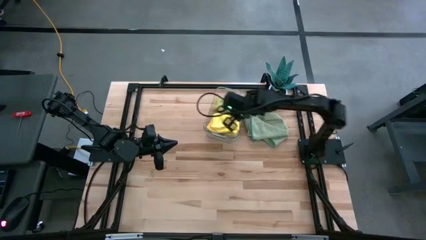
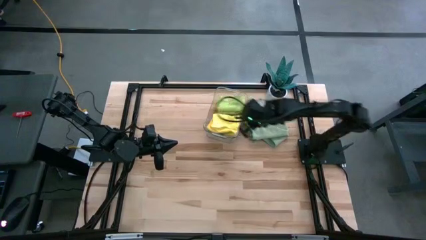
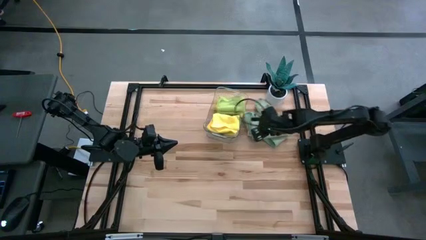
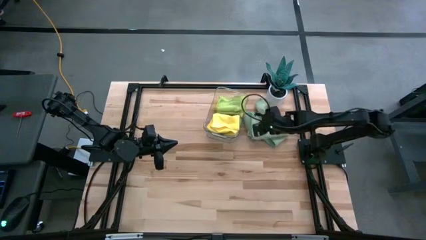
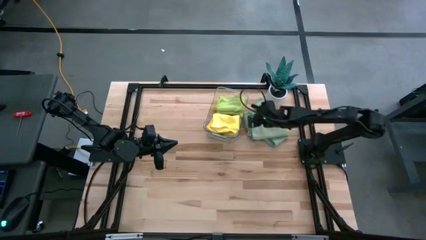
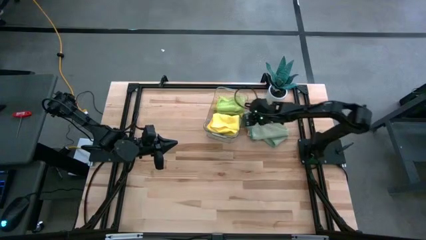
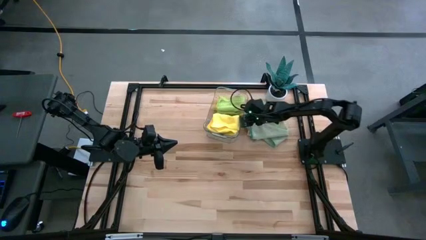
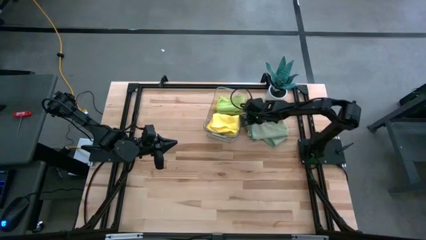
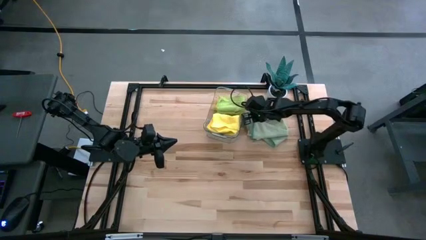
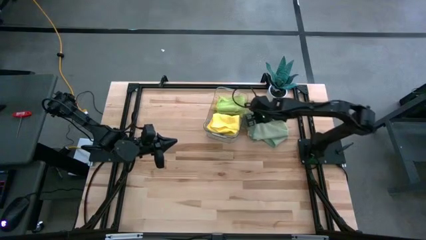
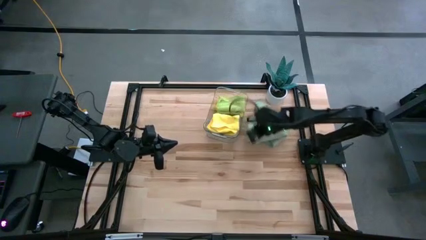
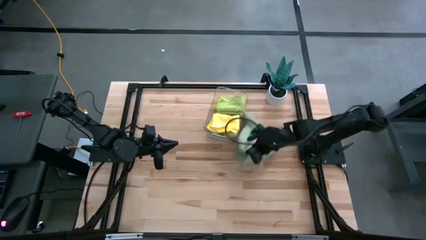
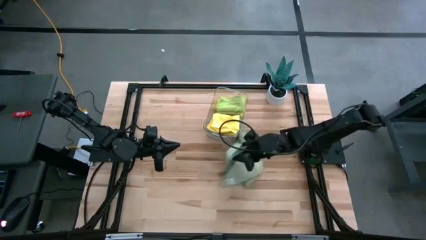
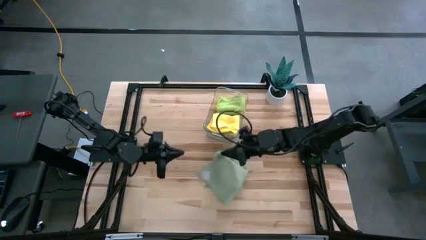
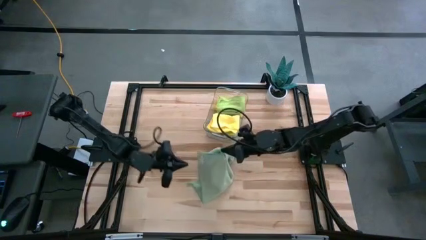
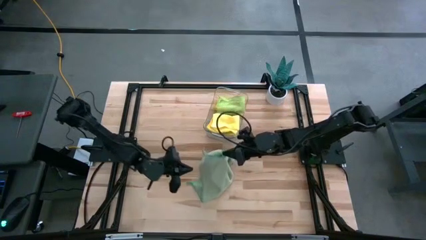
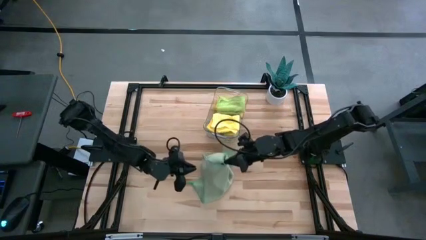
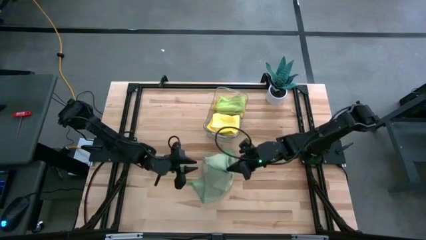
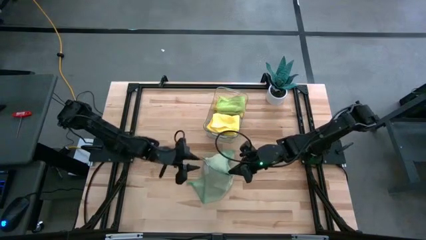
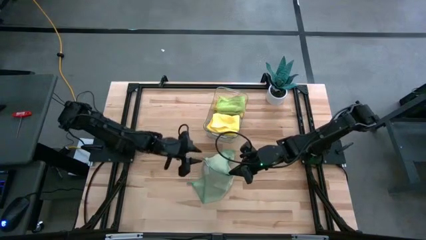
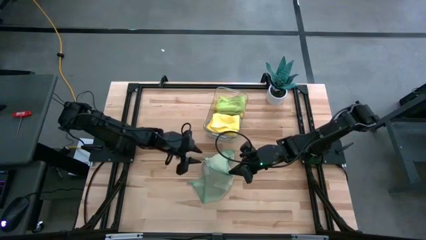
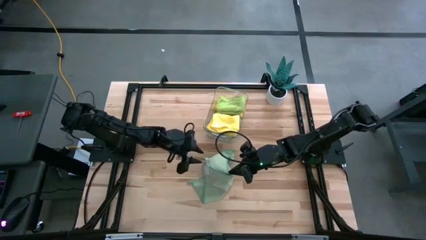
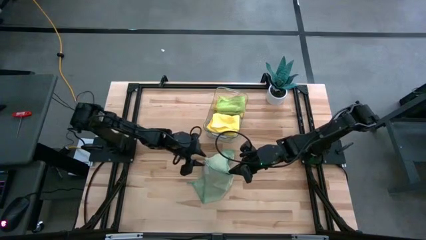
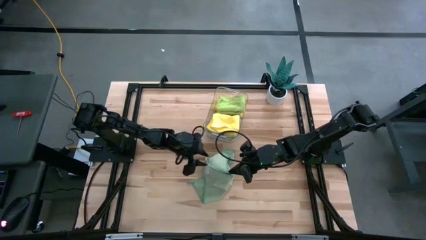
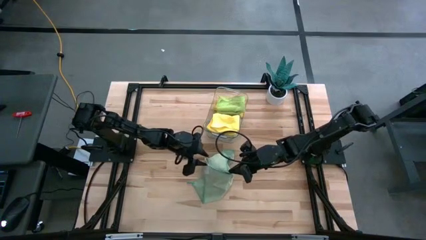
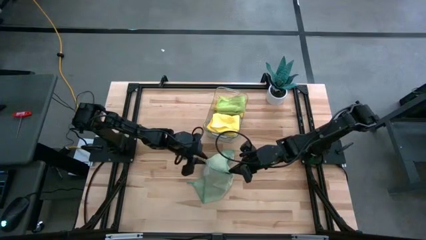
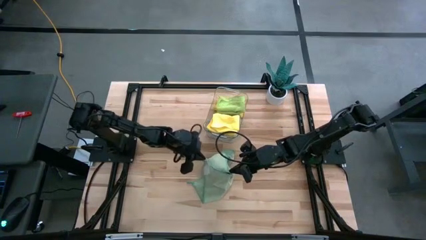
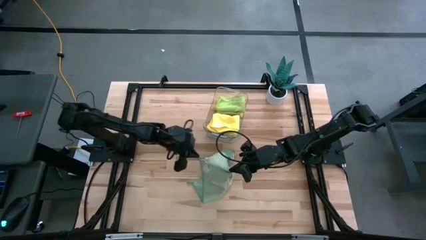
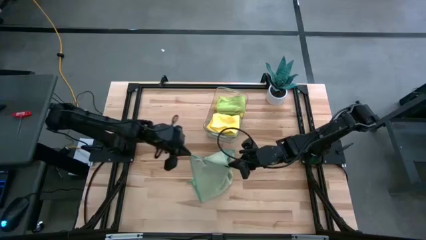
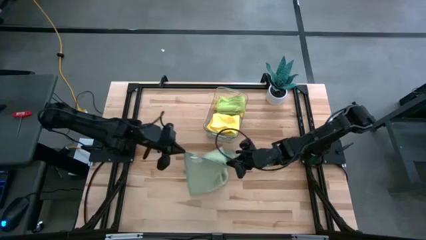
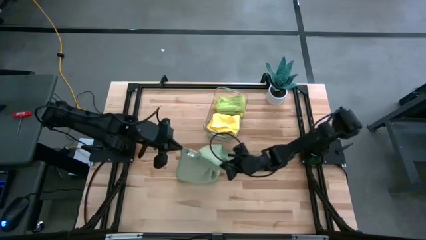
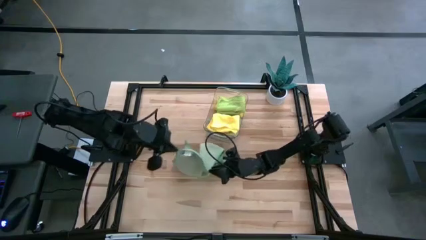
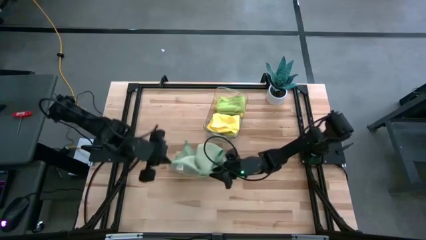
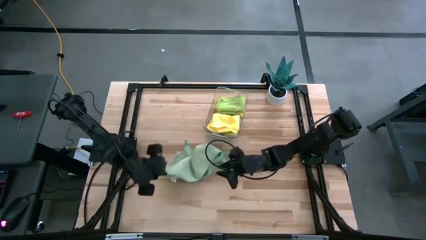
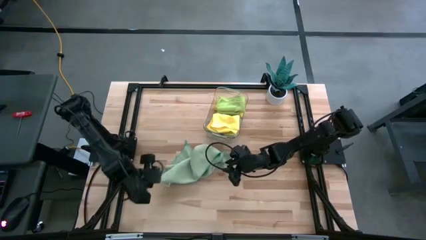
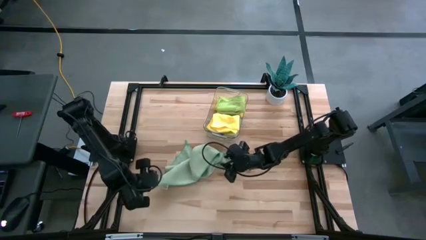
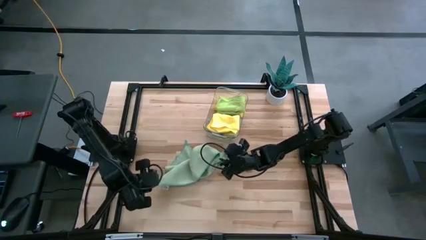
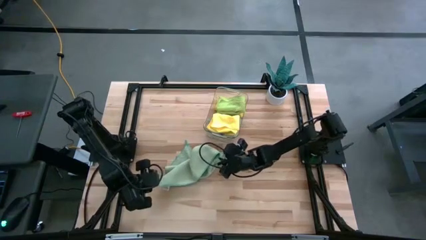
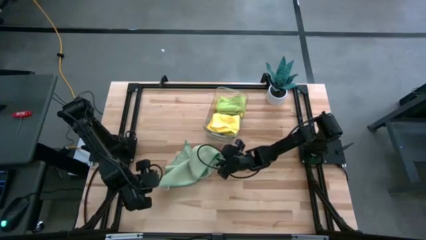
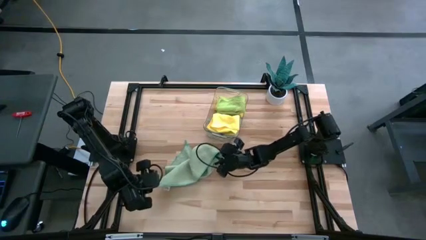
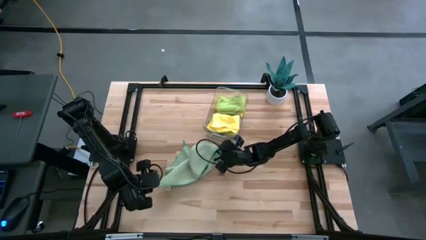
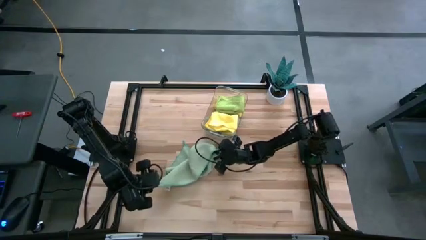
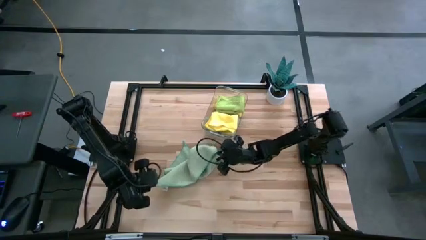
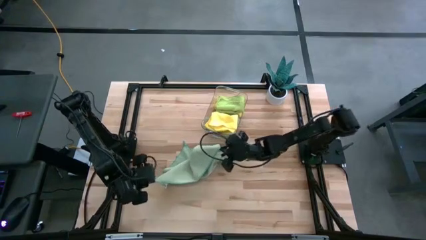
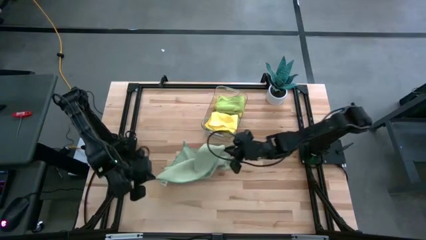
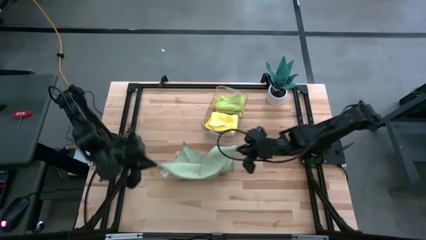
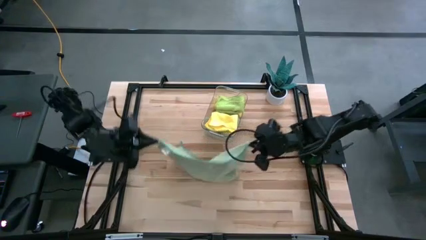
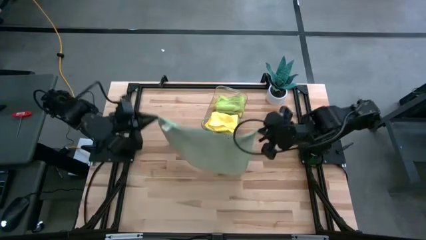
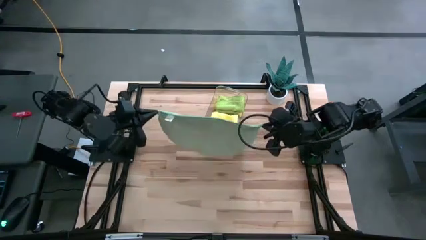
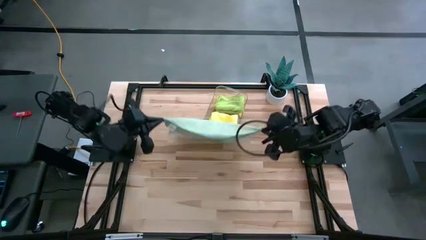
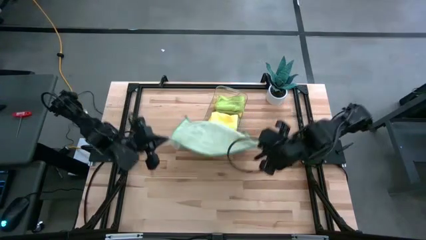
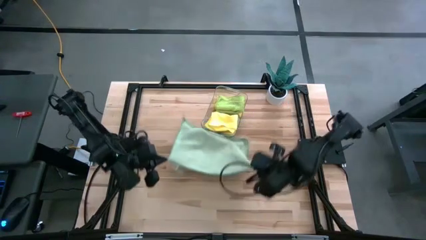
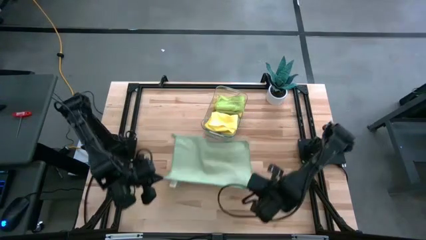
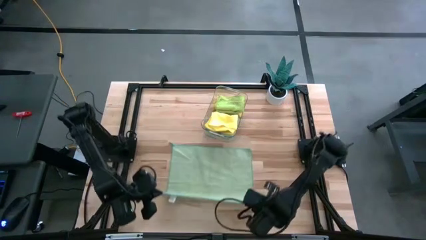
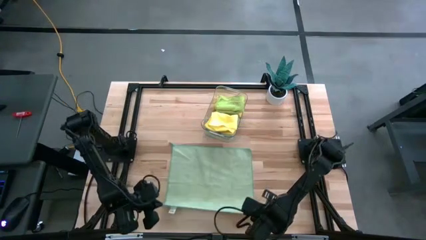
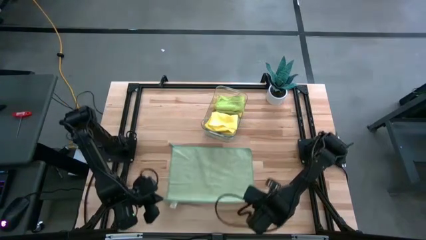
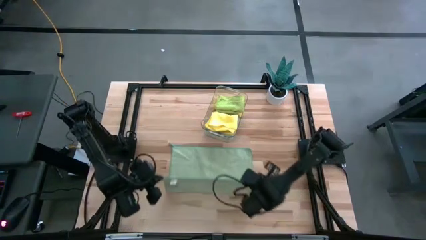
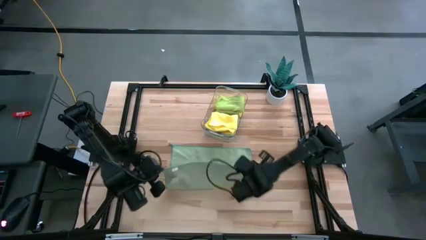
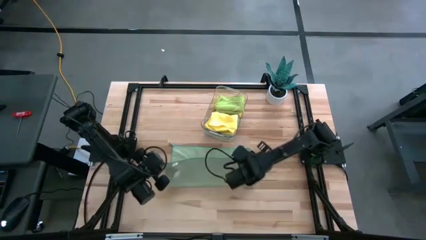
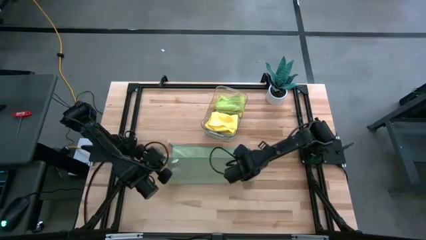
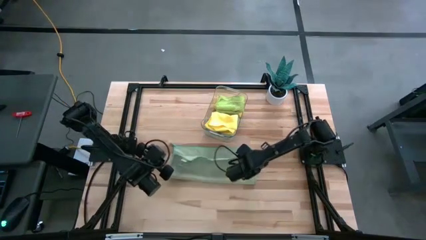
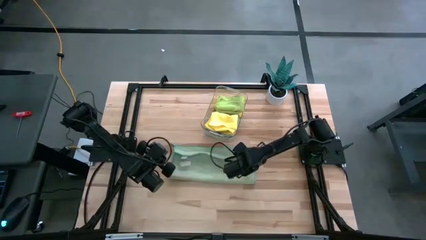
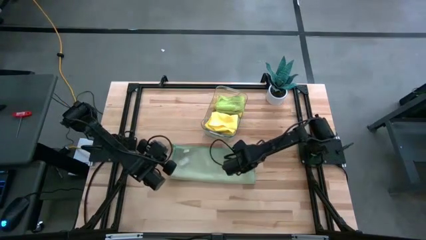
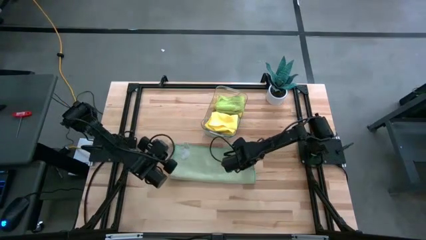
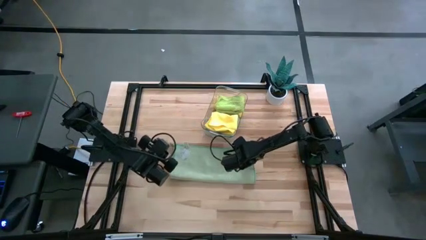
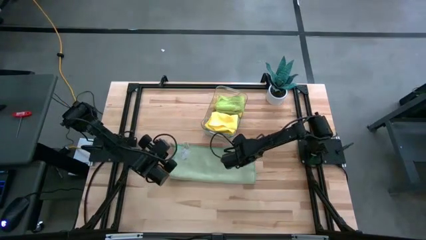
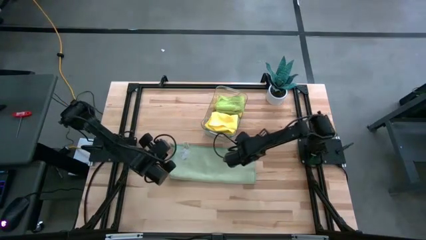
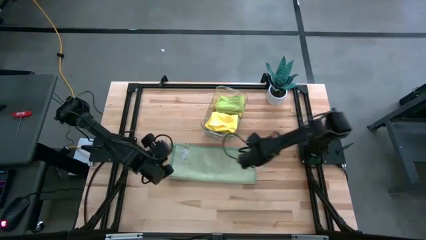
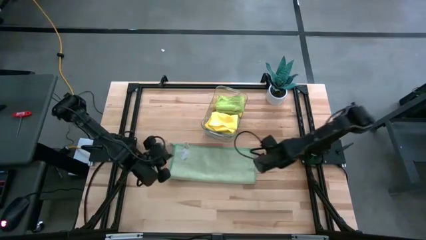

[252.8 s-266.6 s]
Task: Fold microfiber towels
Fold the blue towel

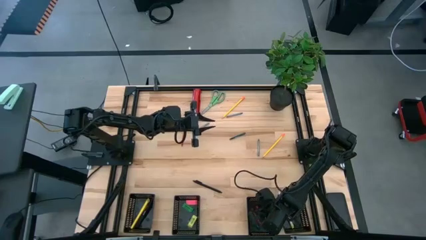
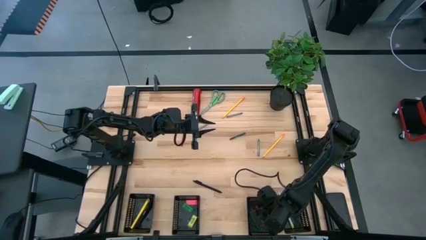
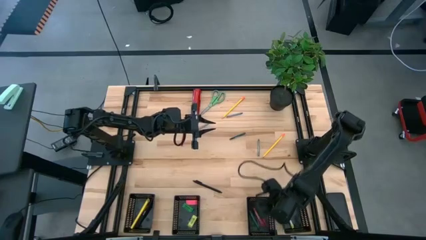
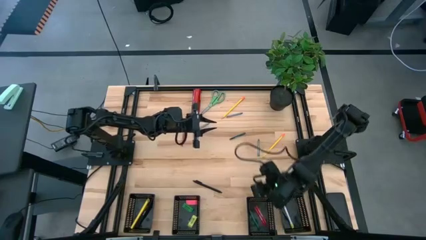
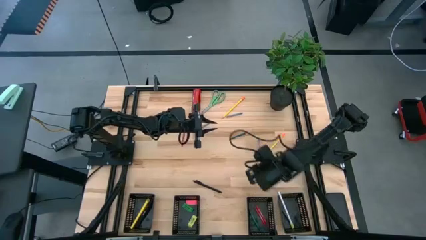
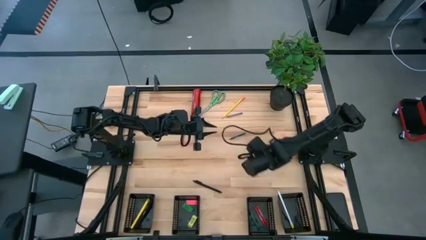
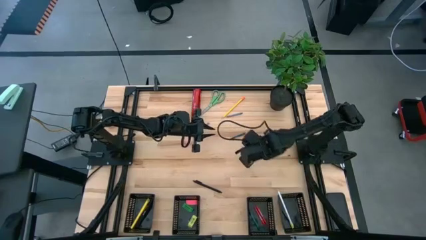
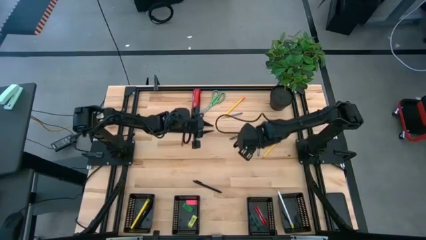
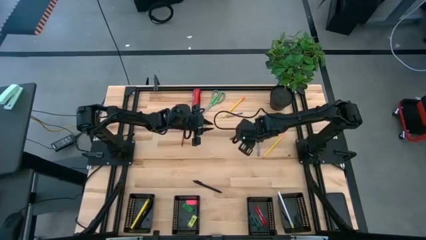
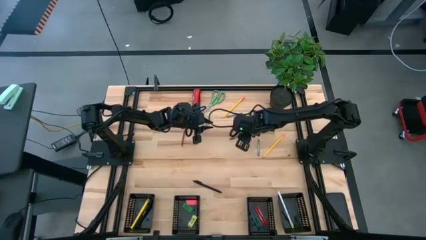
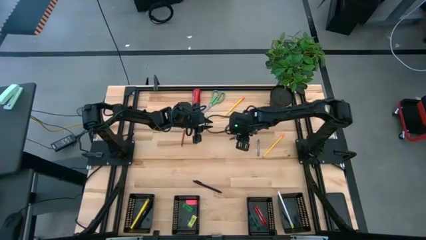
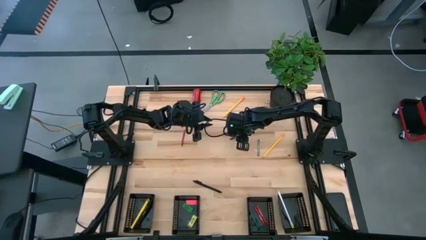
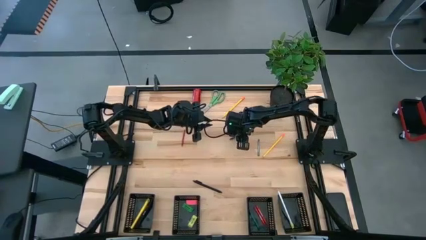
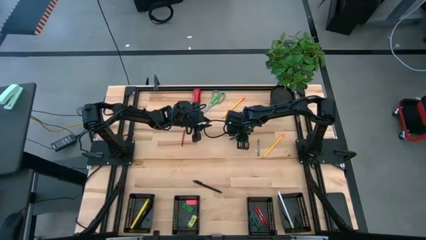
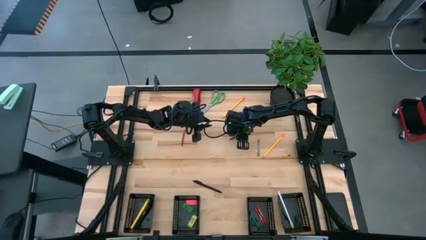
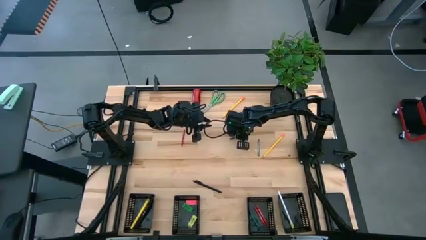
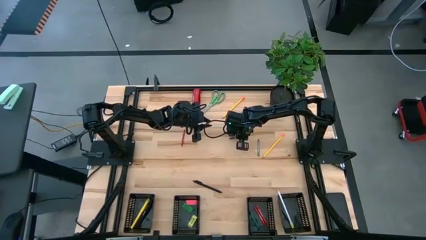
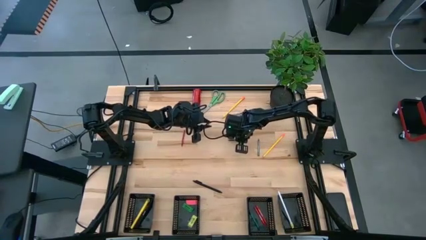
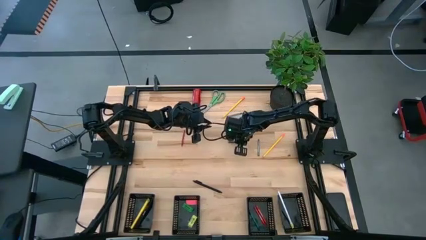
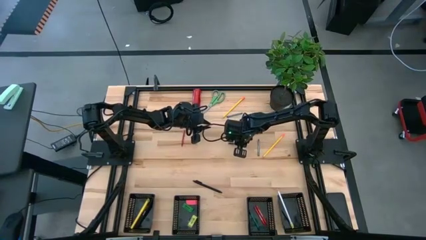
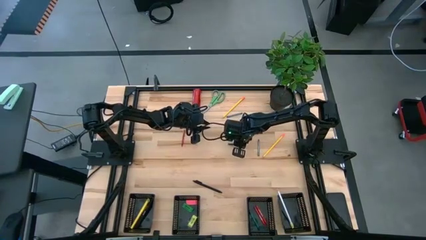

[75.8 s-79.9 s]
Task: Sort crayons/erasers/pens/pencils in bins
Put the green crayon into the middle right black bin
